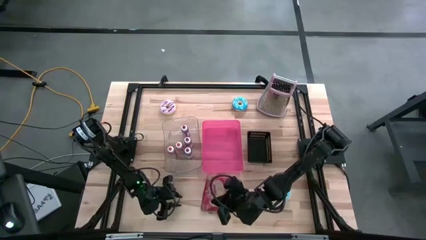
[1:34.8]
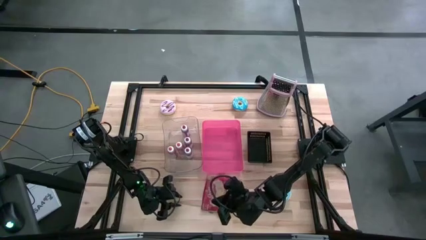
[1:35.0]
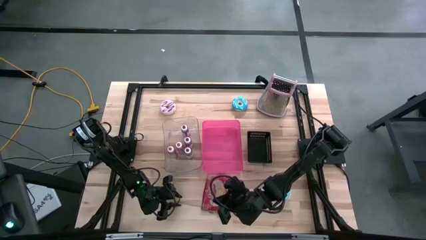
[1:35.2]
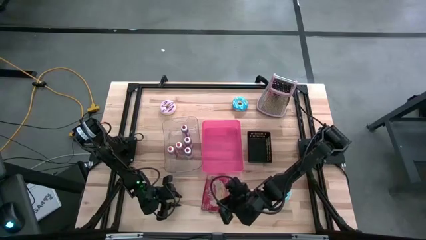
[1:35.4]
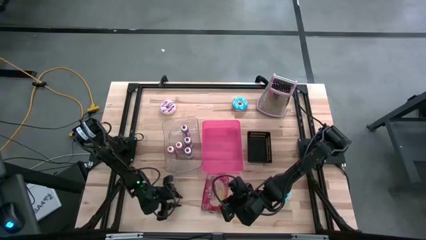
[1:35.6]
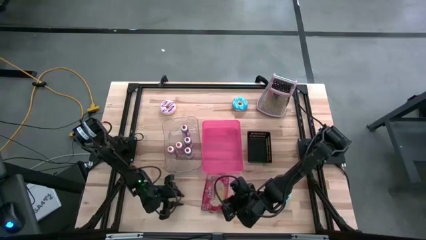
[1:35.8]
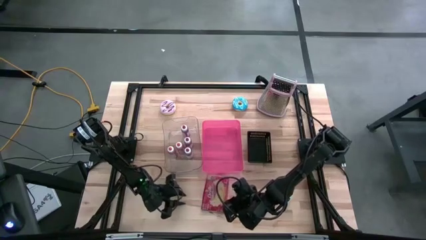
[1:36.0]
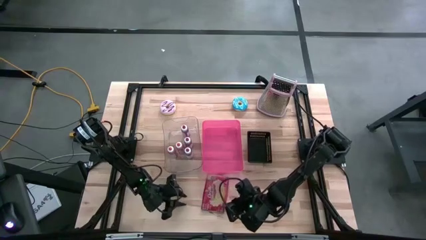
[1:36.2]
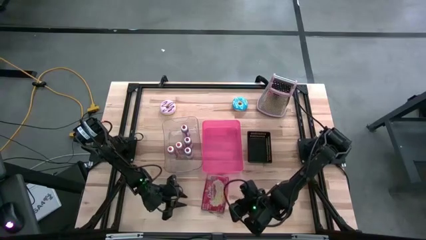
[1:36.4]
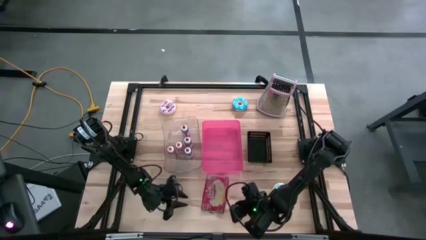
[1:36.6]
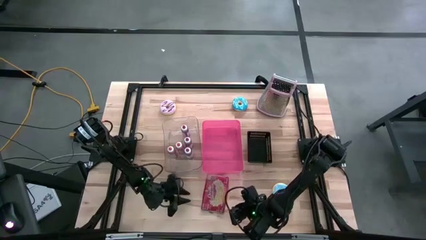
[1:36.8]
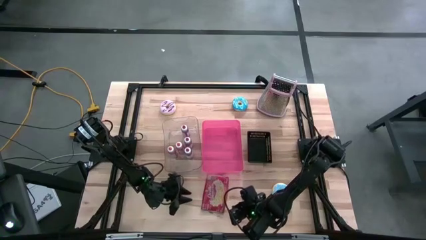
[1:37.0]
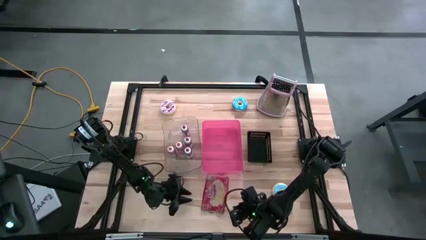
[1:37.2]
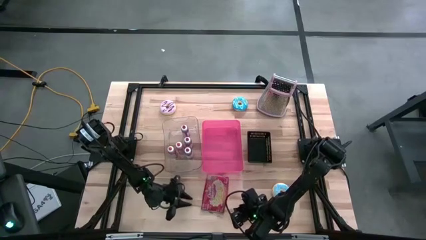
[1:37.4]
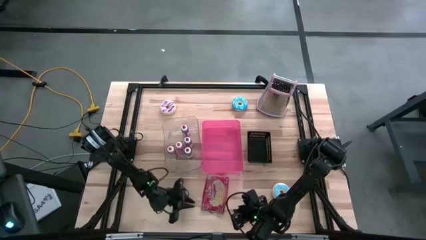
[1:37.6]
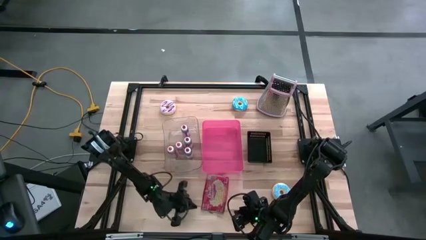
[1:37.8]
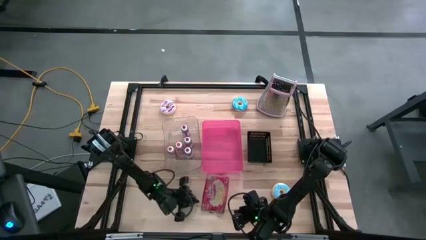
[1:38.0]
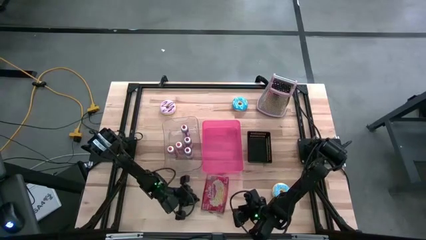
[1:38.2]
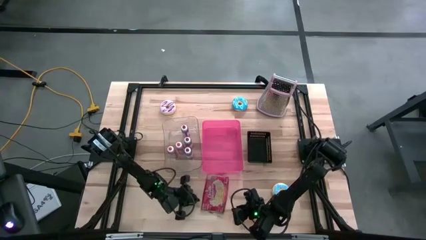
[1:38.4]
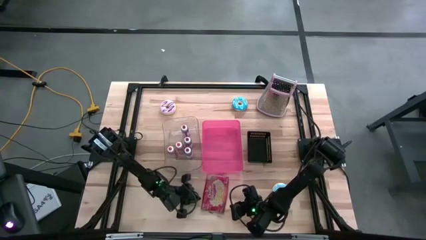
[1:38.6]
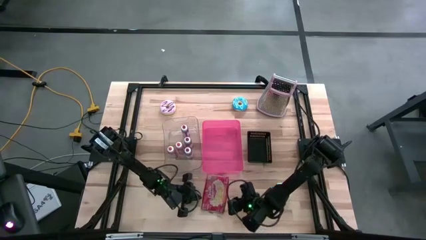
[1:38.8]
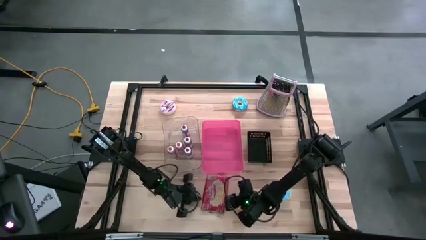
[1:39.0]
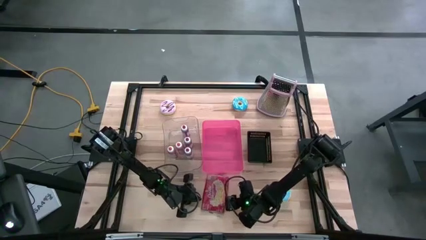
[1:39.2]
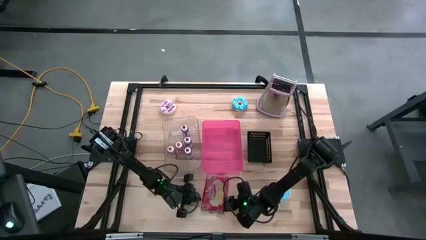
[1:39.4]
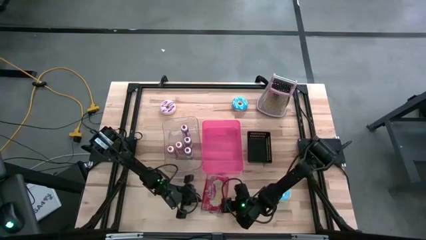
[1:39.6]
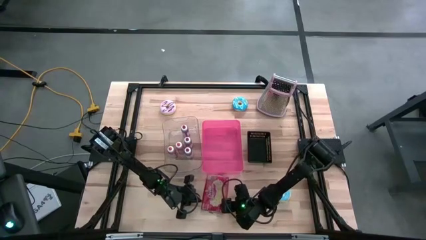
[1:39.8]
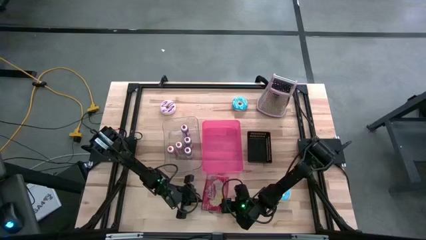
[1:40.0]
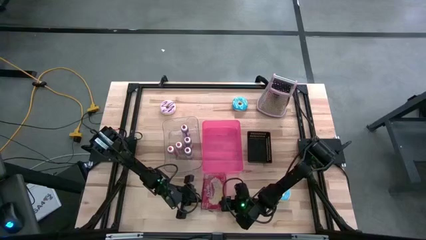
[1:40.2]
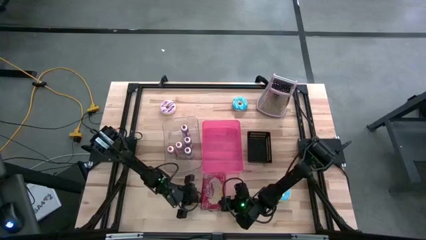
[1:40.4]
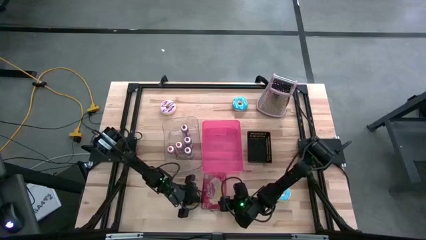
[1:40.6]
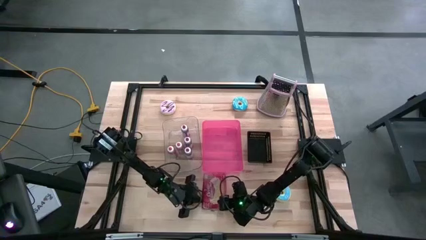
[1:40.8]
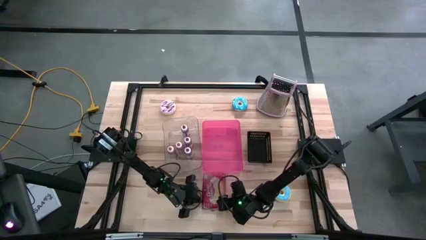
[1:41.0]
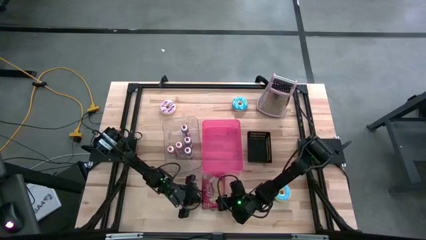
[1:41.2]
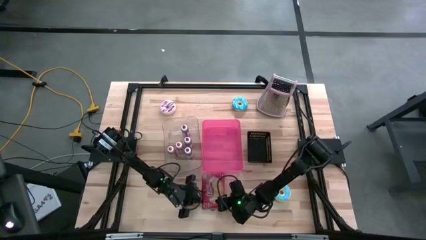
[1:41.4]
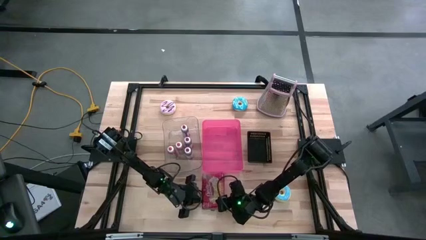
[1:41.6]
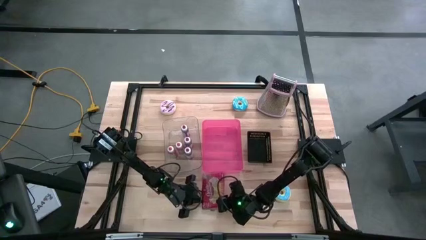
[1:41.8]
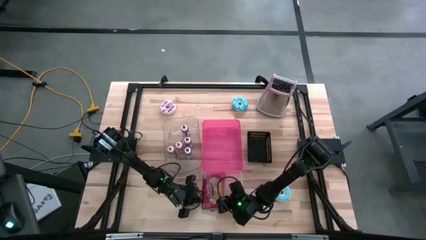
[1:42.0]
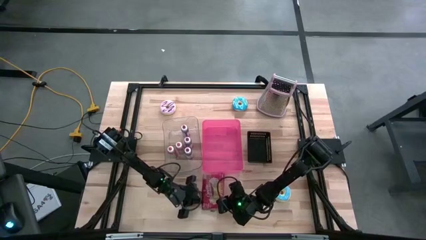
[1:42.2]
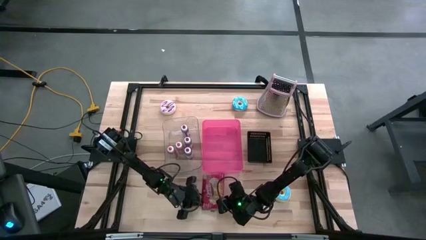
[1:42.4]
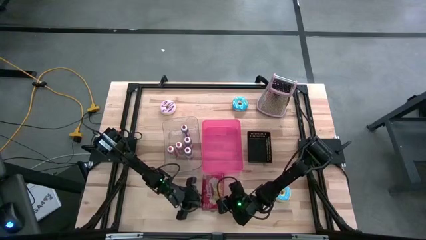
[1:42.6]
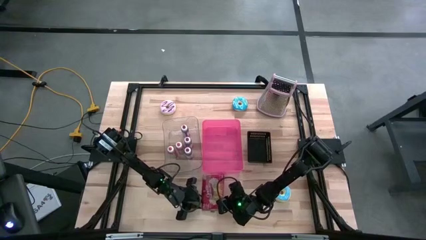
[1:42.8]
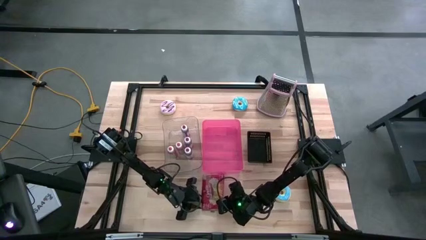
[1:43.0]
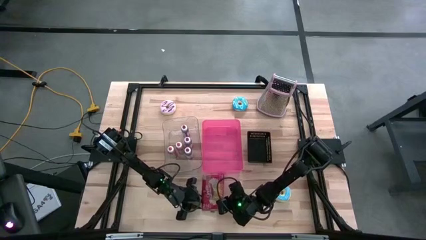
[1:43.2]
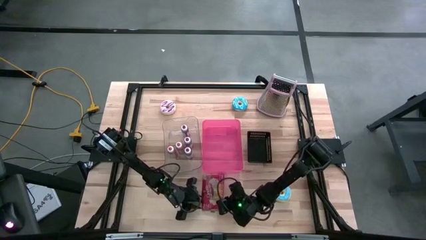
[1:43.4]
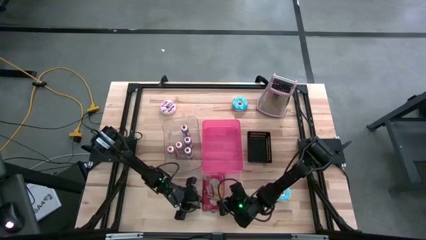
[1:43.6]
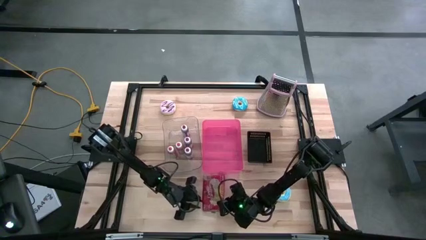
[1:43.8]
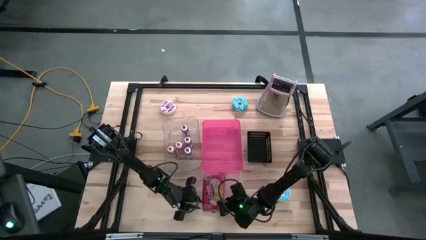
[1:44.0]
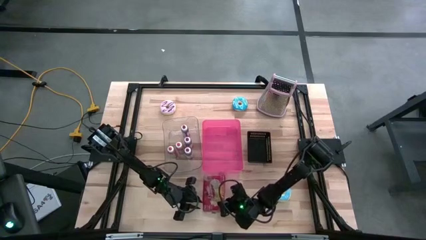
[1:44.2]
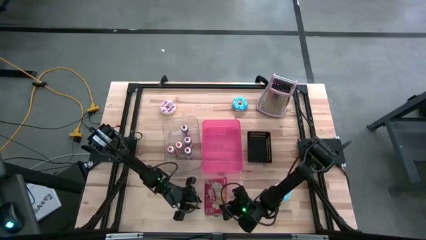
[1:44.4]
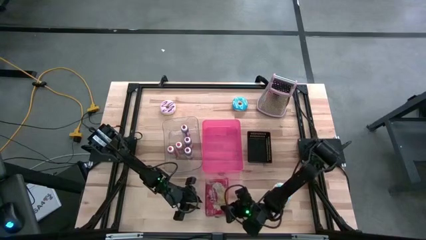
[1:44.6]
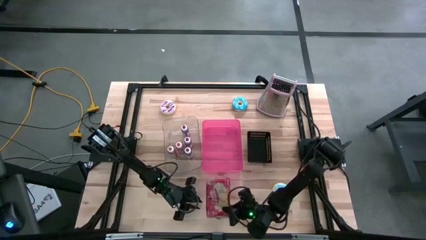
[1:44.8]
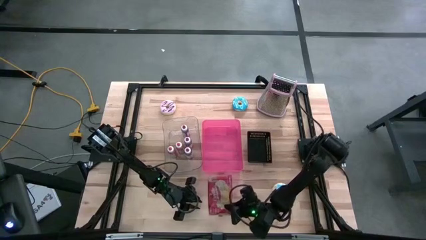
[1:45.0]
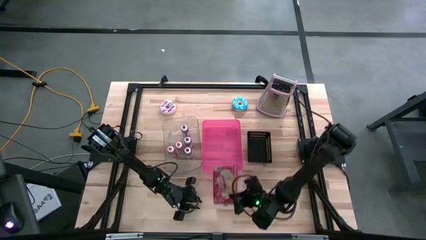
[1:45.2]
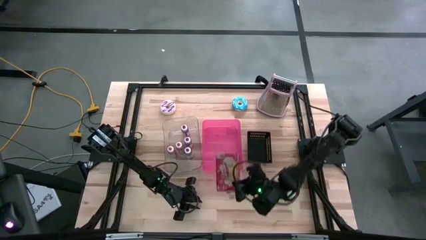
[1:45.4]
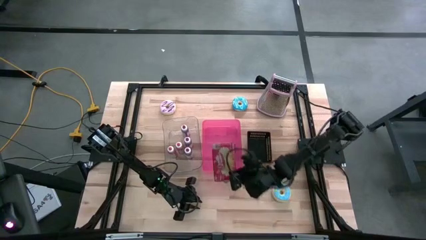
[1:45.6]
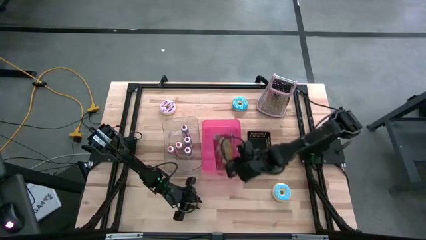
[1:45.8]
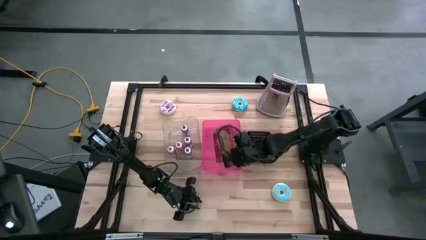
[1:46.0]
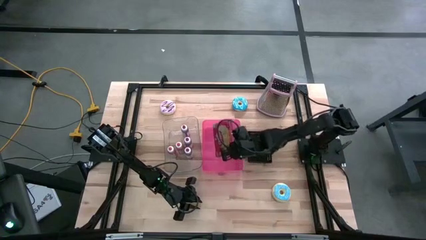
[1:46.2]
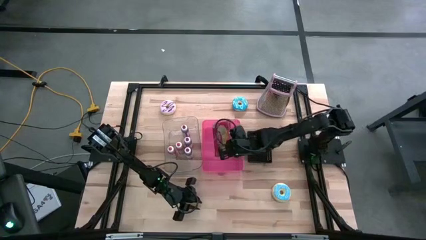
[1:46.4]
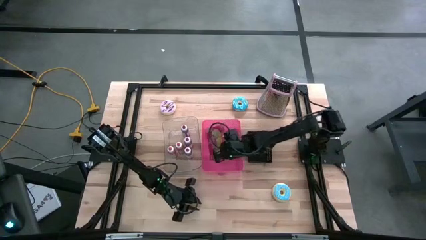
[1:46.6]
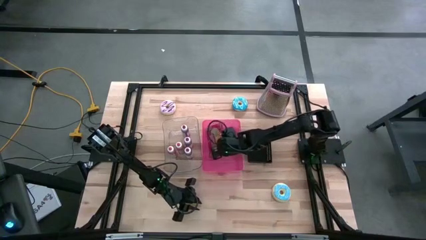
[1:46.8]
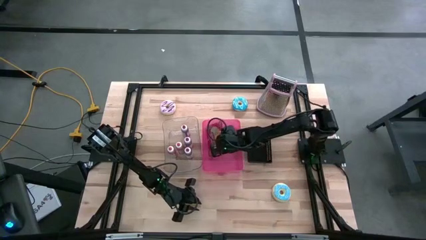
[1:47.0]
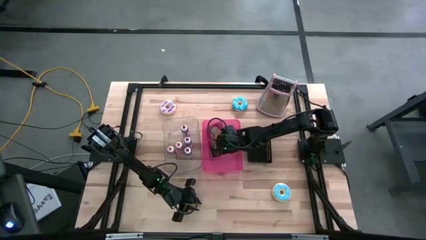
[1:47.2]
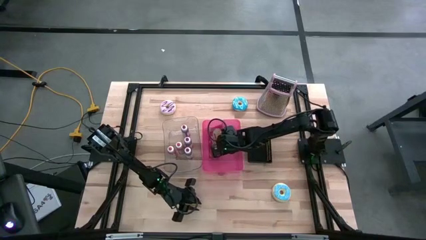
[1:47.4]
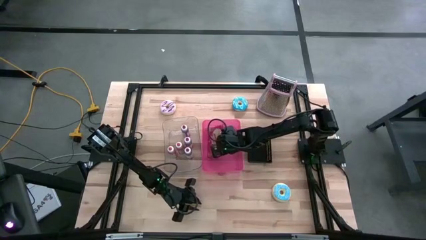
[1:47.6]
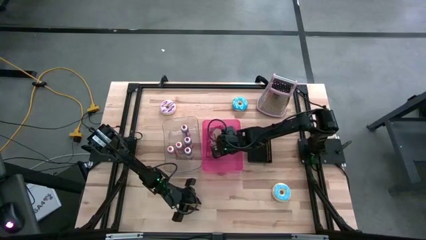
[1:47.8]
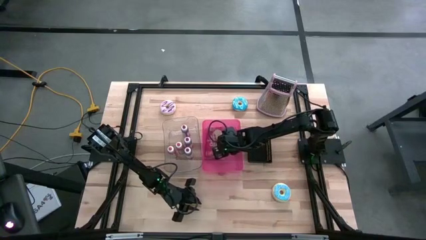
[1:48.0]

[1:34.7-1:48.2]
Task: Pick & Place Food Item
Put the red popcorn pack into the pink bin
